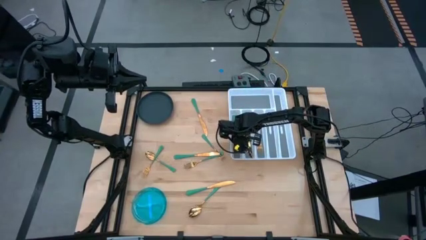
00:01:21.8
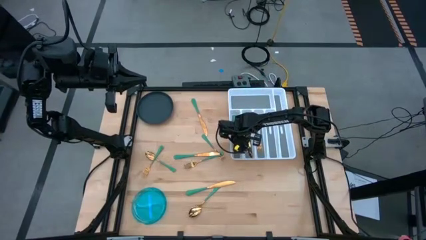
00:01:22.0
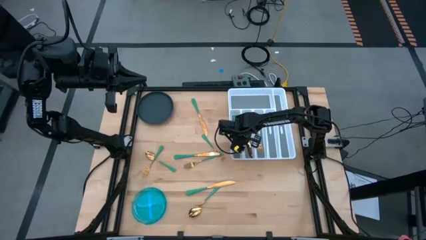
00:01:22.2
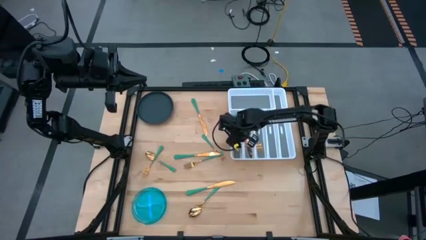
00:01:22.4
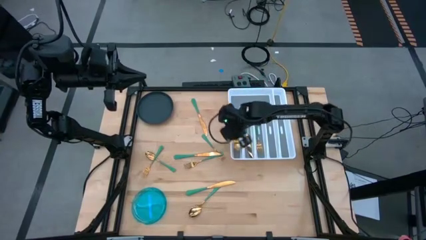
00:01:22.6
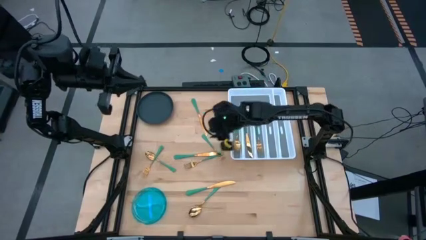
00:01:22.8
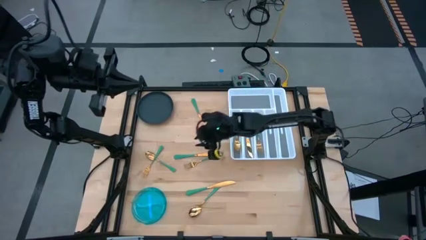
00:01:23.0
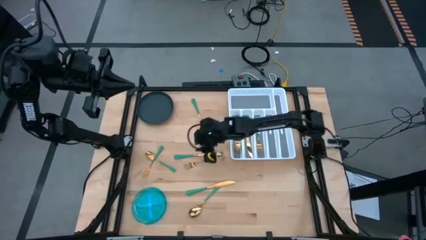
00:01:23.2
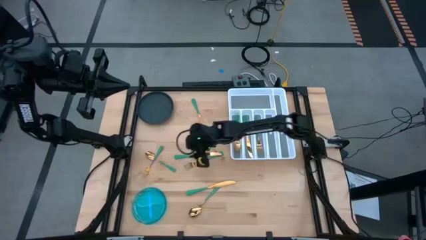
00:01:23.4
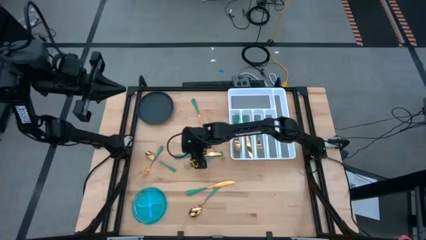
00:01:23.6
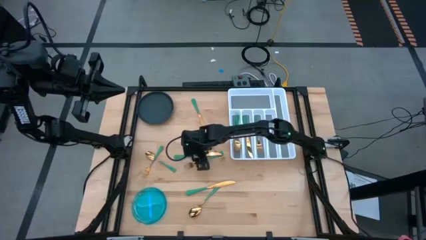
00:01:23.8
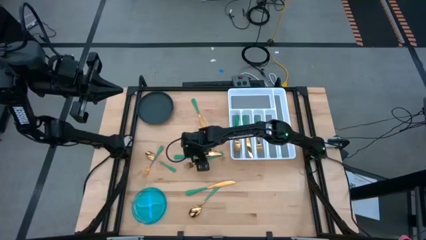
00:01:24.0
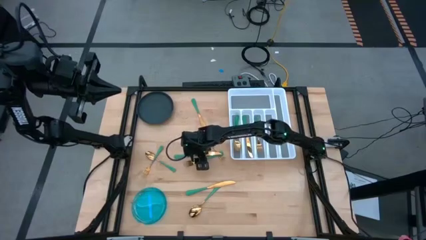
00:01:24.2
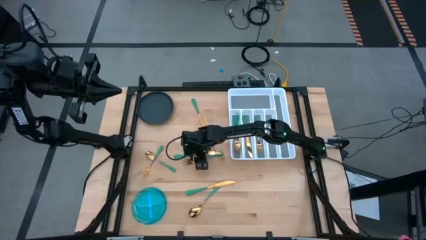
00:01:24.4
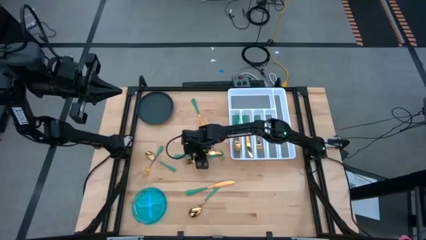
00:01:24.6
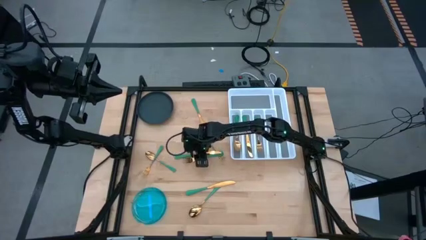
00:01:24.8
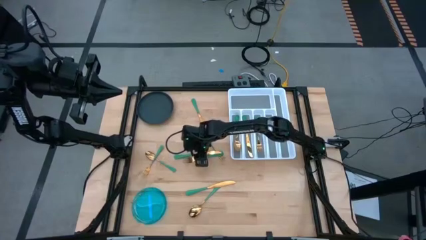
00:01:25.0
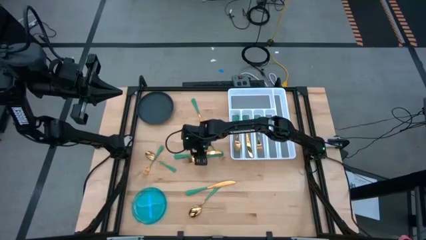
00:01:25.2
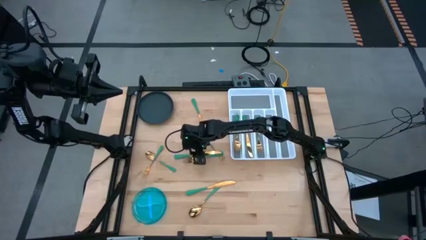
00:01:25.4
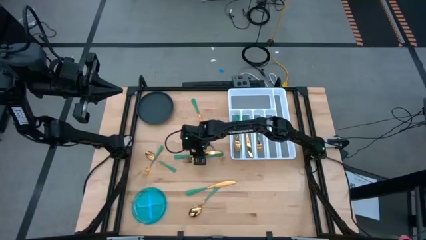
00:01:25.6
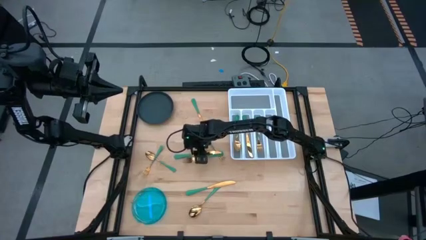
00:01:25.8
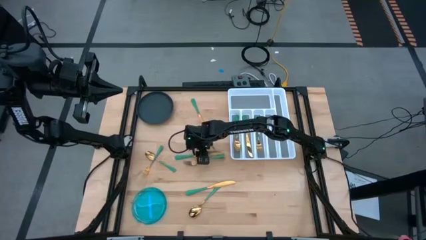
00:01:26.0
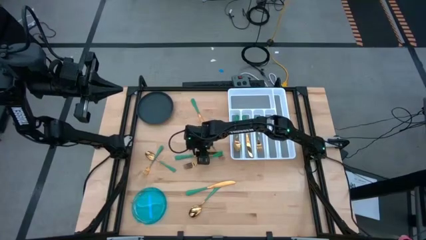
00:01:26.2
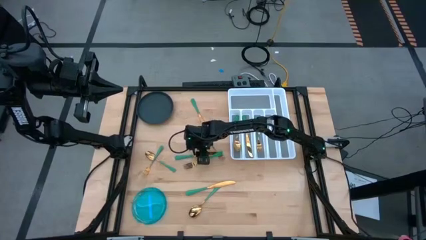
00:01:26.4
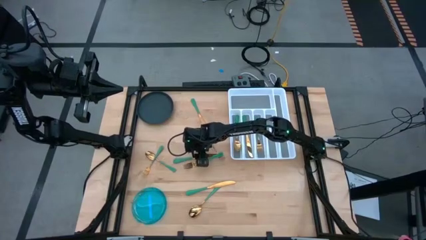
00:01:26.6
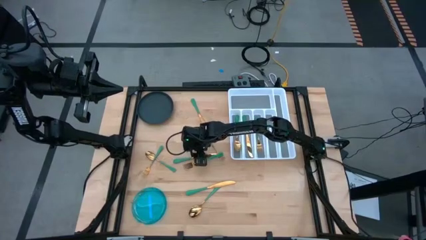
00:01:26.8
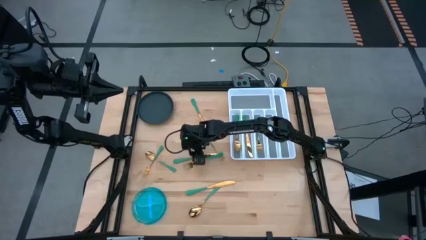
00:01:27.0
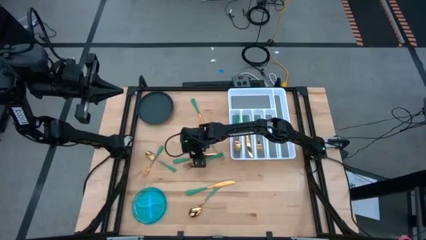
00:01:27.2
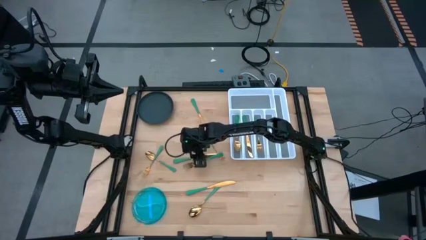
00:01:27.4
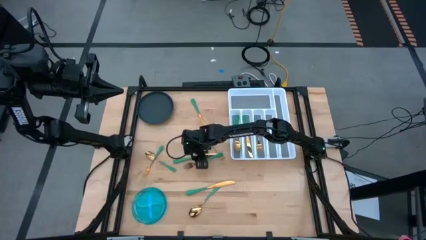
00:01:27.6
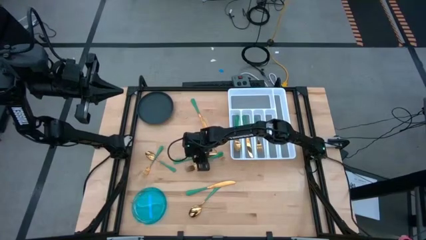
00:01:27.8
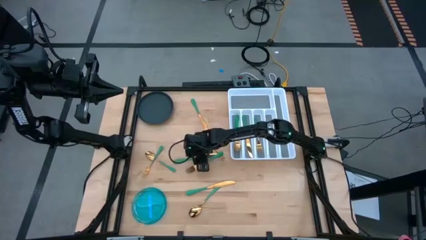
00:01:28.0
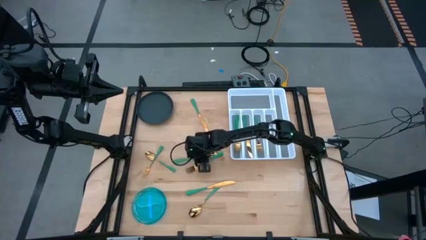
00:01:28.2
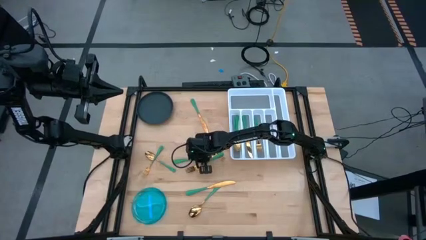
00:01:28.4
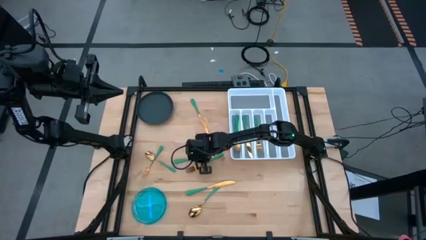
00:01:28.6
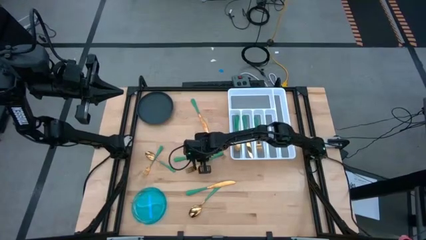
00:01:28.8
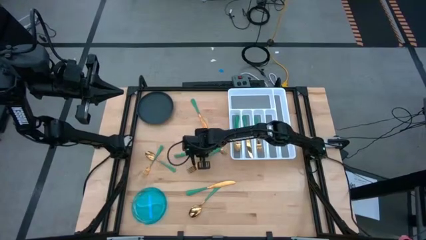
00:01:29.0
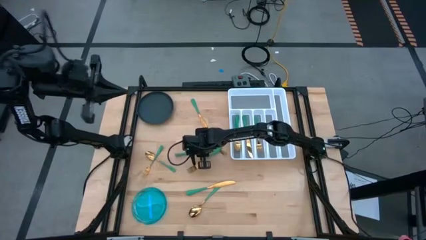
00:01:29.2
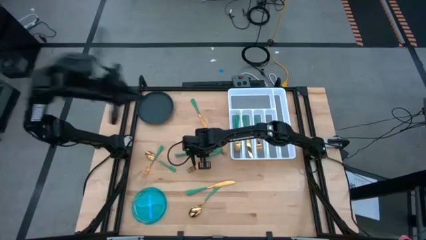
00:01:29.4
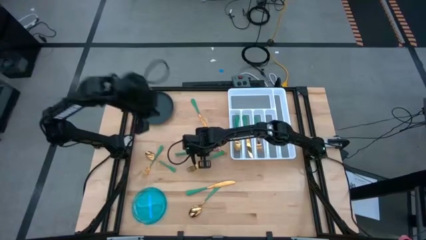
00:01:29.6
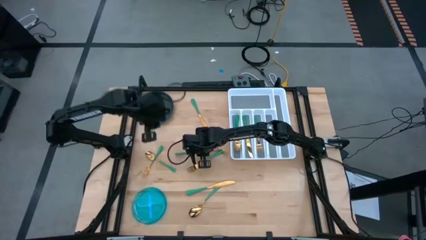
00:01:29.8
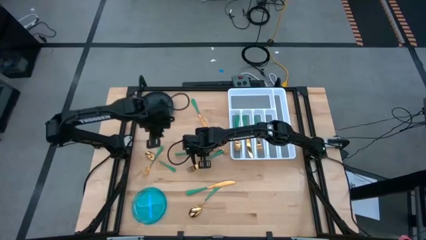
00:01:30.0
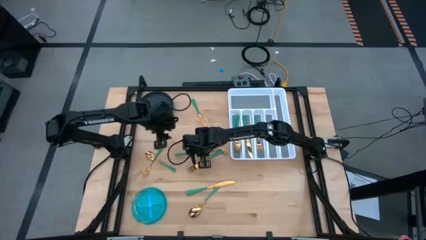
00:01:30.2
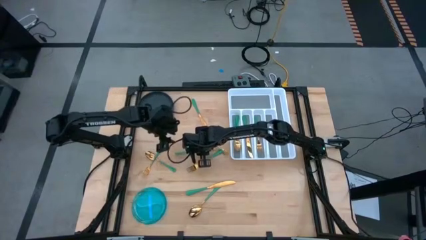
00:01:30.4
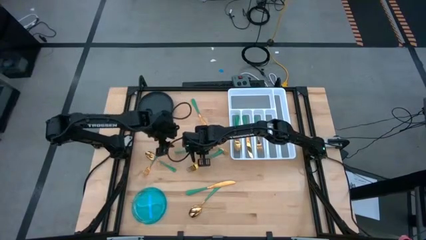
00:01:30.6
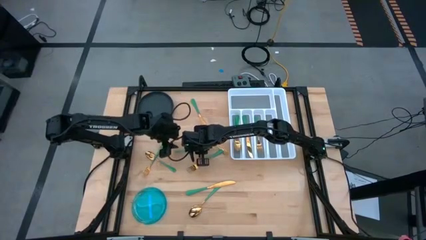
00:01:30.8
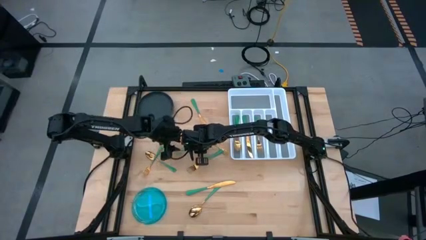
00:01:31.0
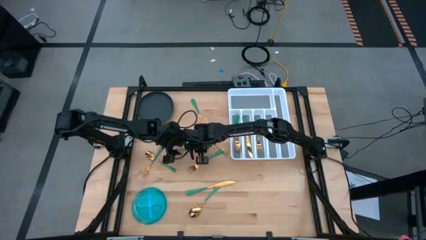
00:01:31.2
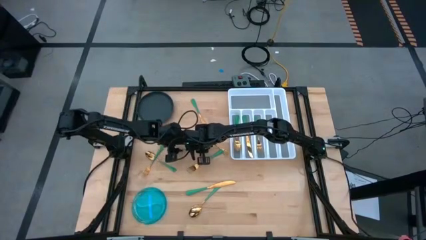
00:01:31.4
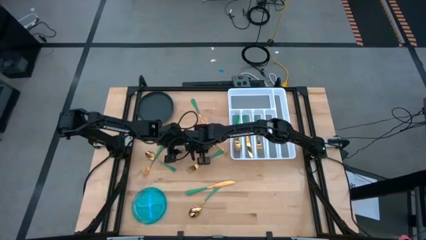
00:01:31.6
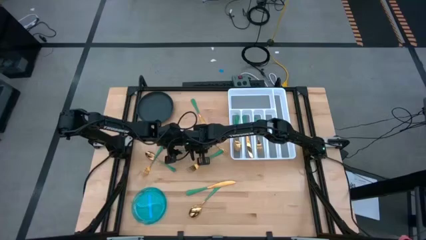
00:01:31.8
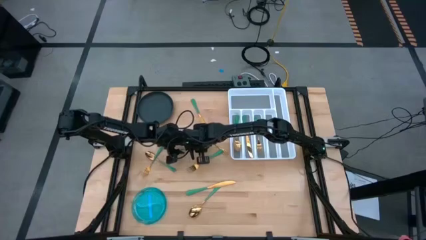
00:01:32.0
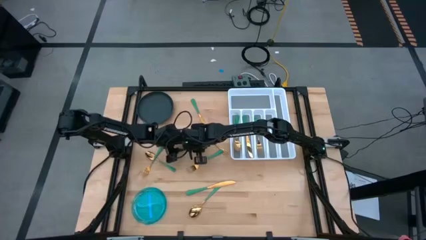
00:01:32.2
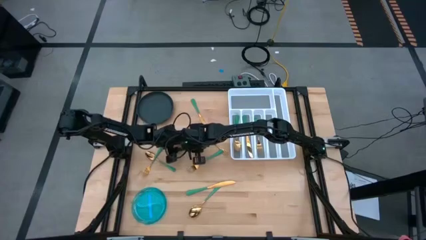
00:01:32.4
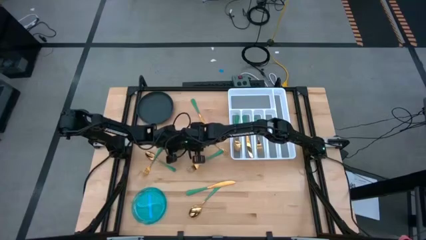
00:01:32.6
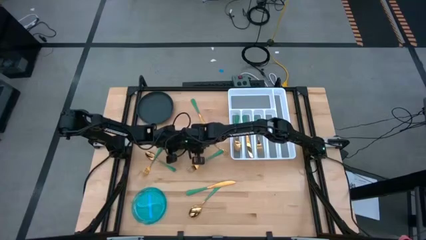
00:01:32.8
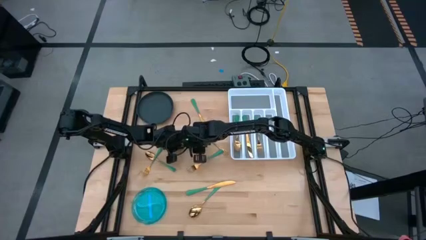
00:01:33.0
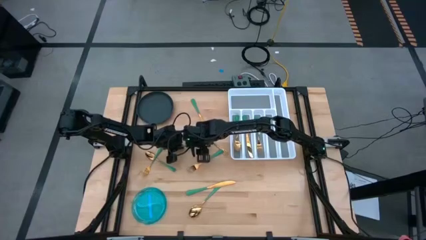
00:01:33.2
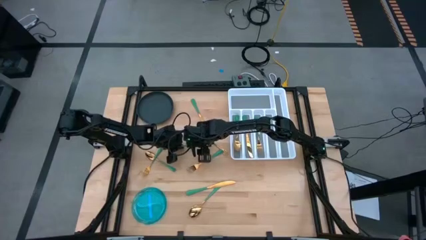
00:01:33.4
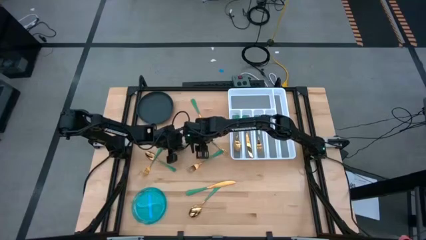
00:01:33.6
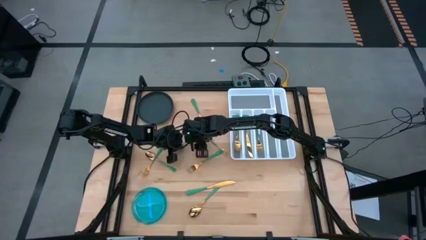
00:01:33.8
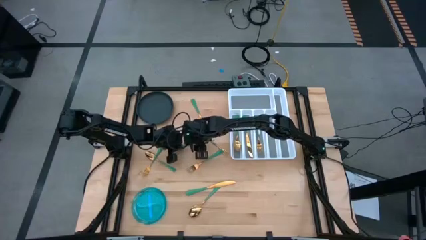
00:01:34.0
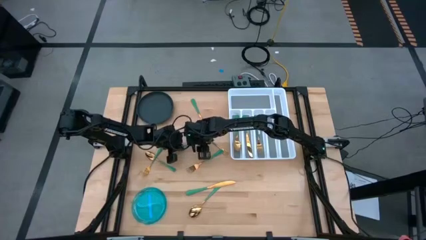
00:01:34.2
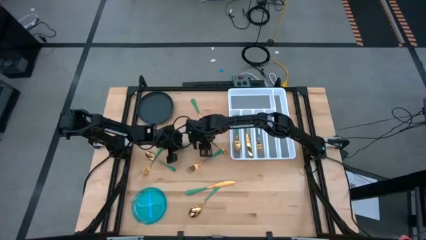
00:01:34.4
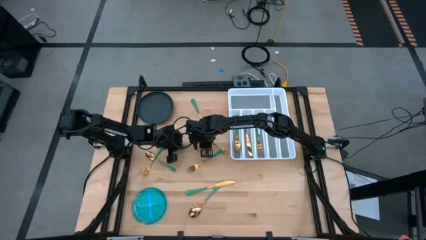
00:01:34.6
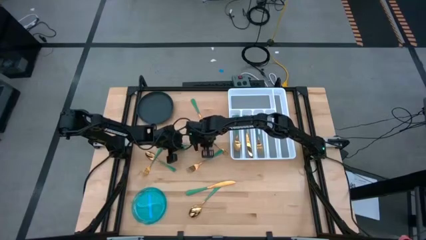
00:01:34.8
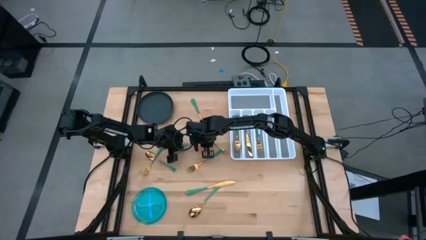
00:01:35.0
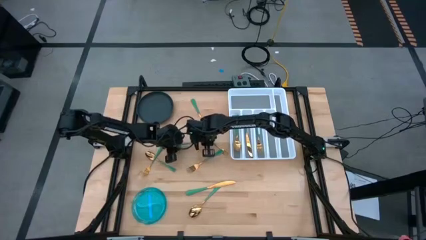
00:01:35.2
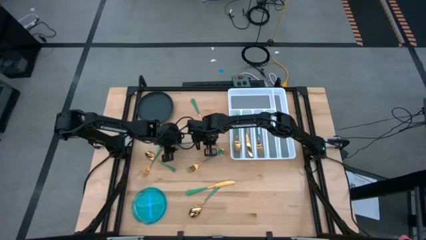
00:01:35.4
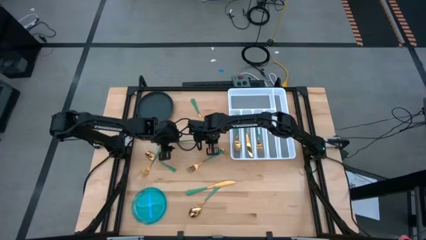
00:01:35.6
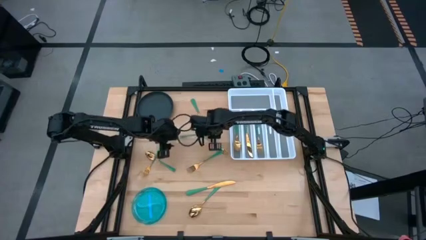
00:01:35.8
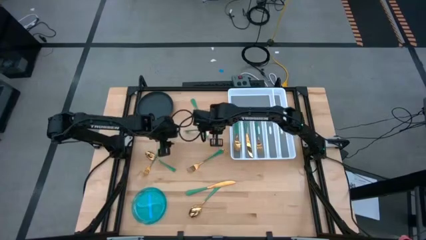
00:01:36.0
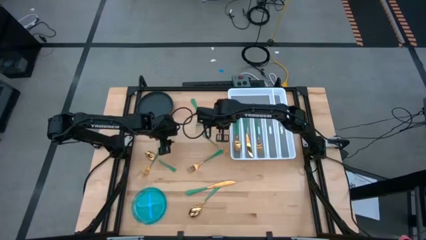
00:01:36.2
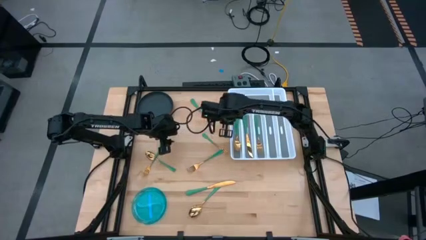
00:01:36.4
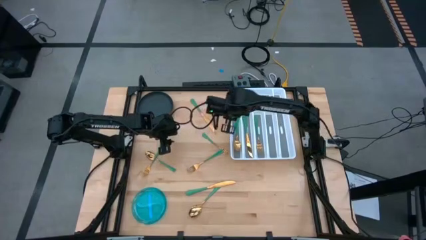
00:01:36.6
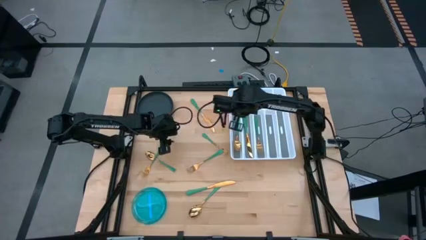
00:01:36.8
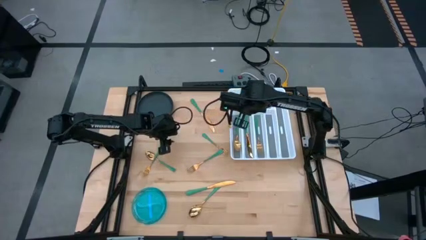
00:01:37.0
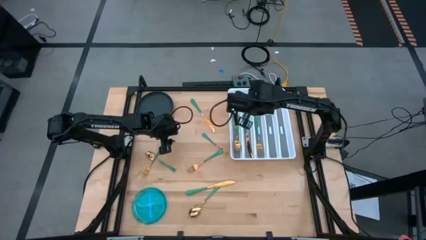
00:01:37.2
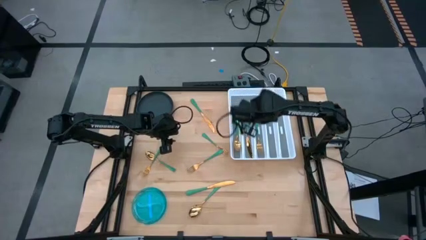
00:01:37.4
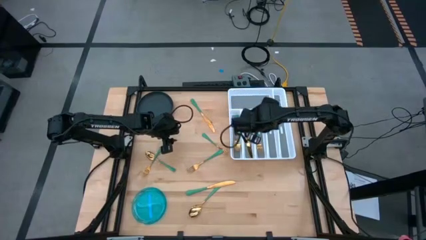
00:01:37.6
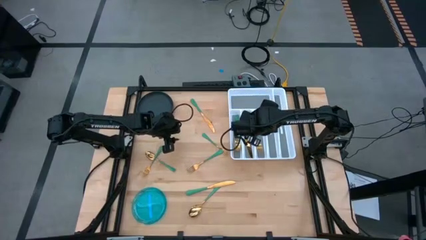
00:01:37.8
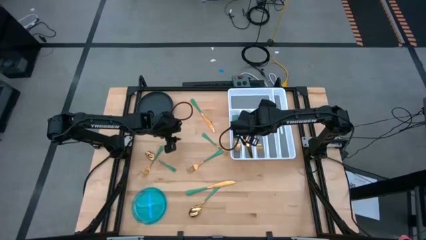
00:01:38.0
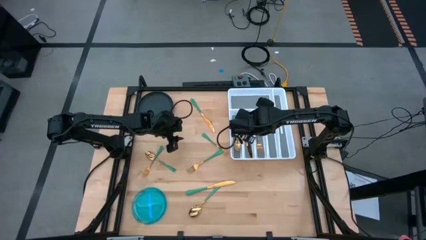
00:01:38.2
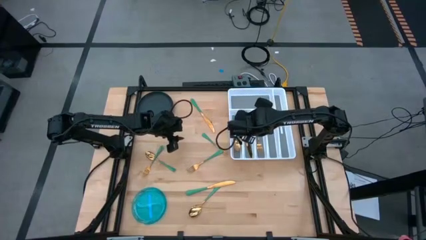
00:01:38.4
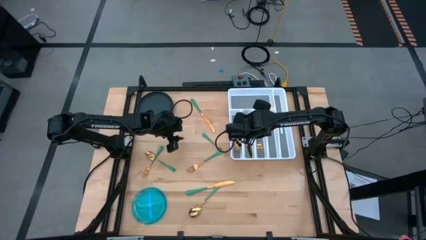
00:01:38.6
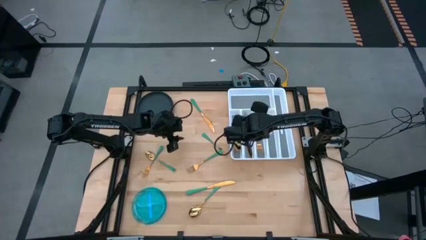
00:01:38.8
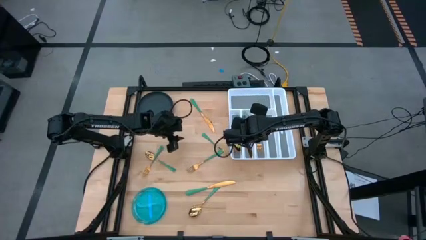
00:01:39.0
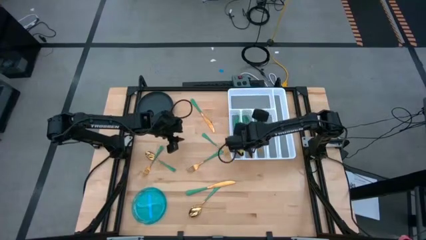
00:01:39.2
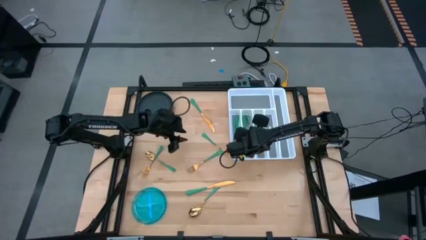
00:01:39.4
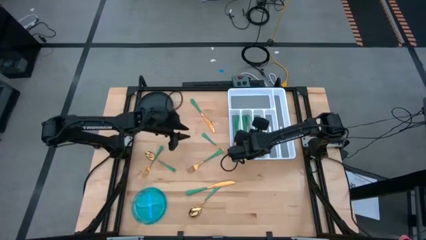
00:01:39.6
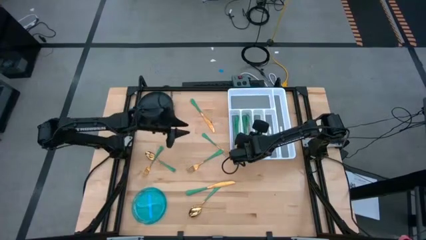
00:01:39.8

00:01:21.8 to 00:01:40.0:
Task: Sort silverware
Put the center green table knife into the middle left slot of the white silverware tray
